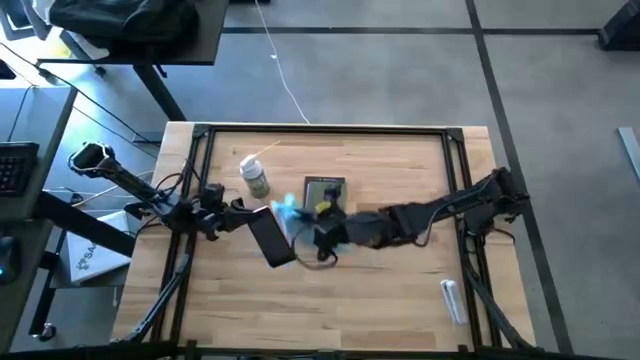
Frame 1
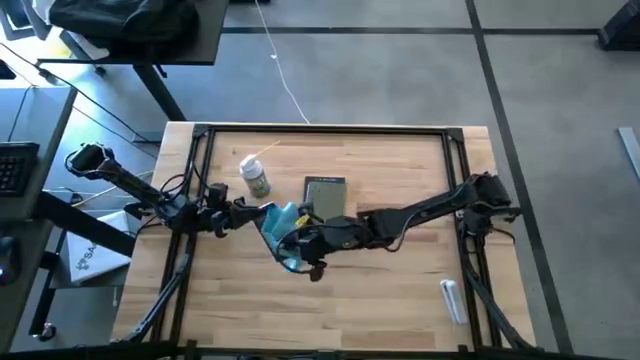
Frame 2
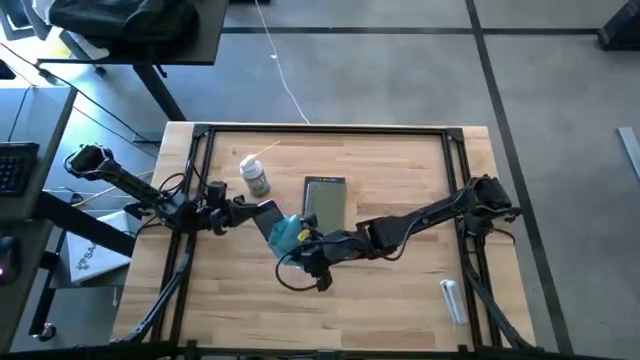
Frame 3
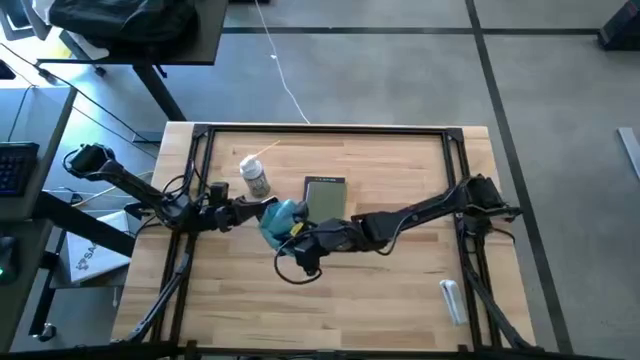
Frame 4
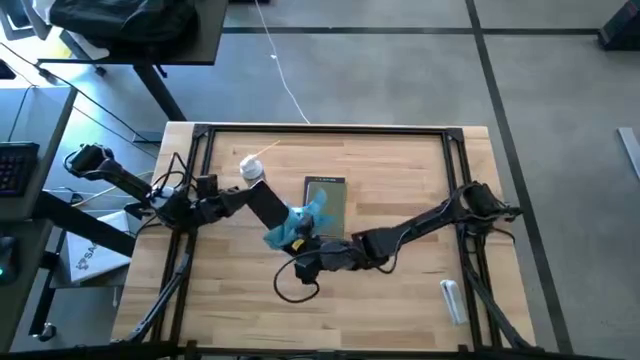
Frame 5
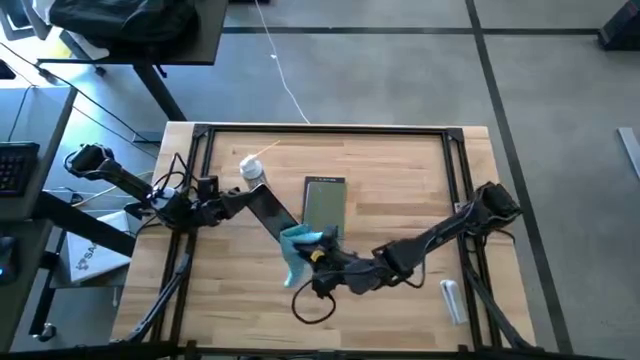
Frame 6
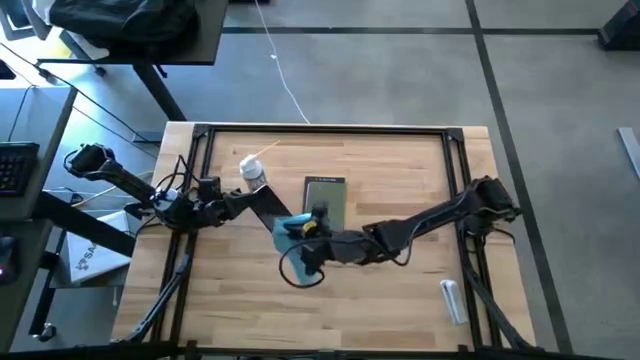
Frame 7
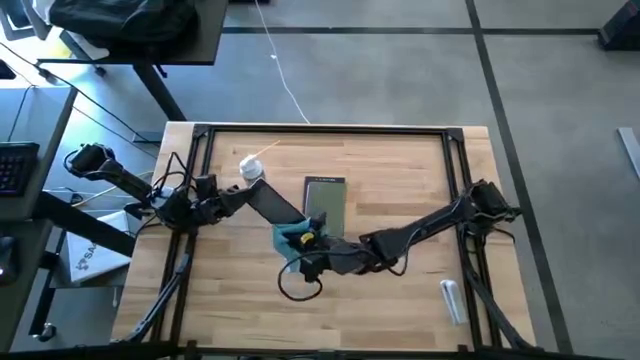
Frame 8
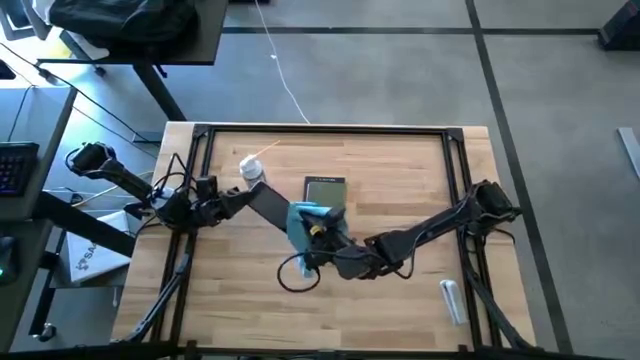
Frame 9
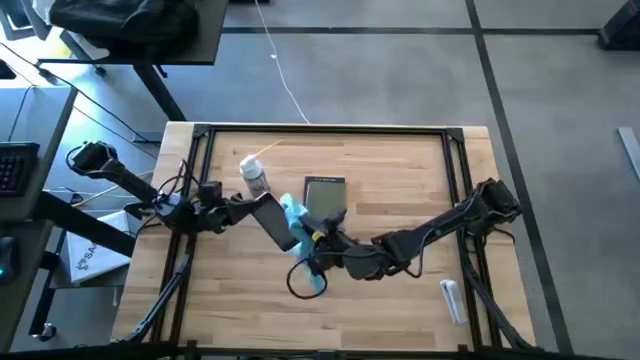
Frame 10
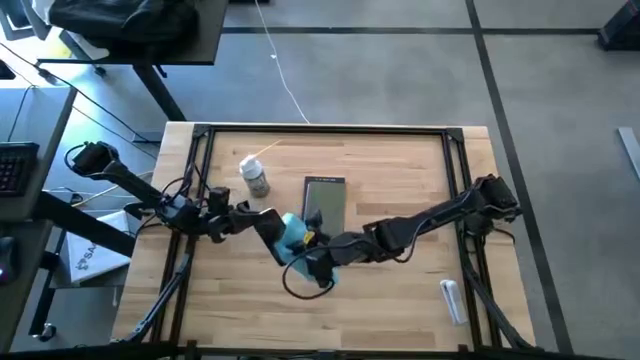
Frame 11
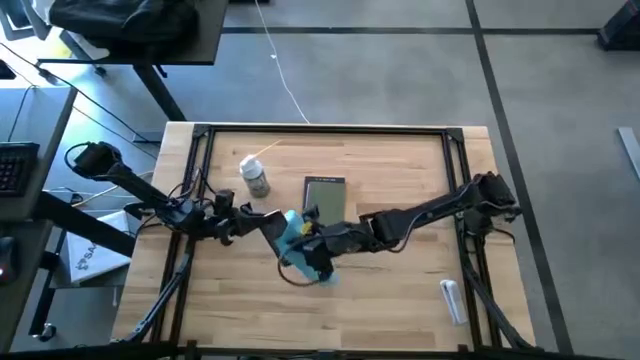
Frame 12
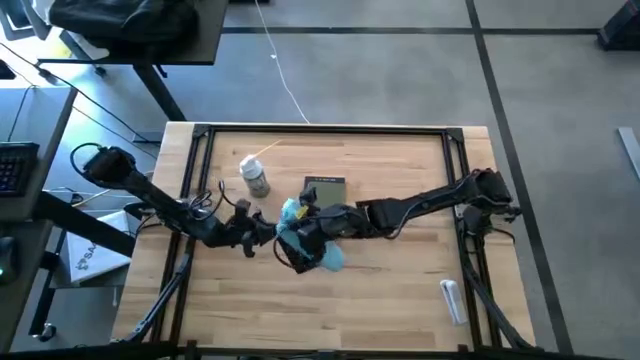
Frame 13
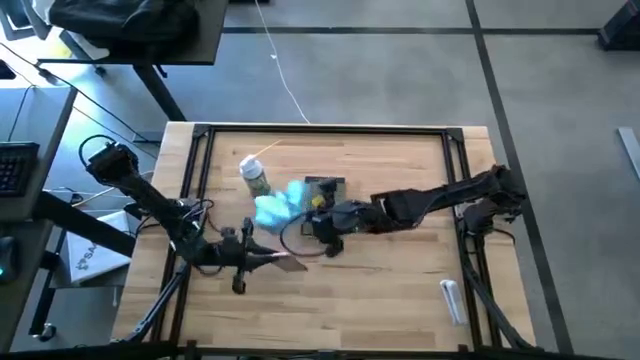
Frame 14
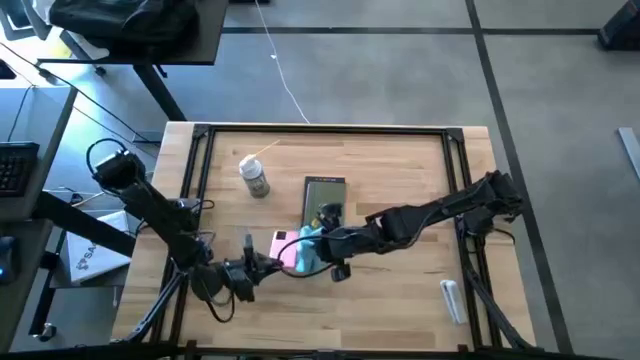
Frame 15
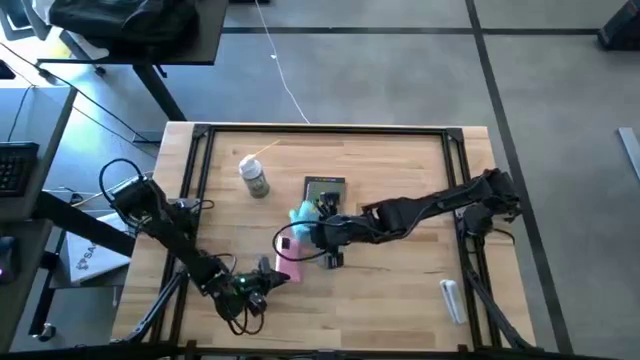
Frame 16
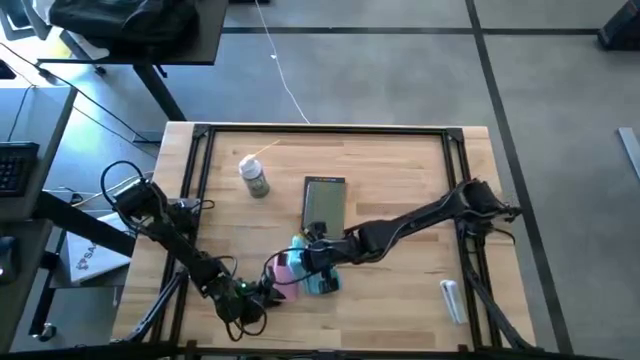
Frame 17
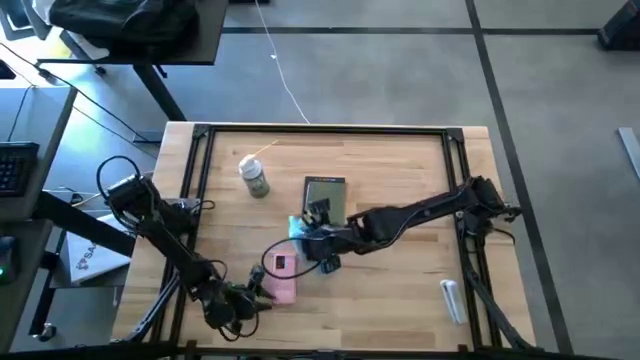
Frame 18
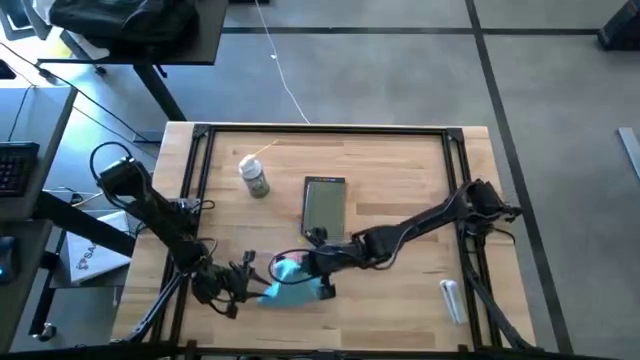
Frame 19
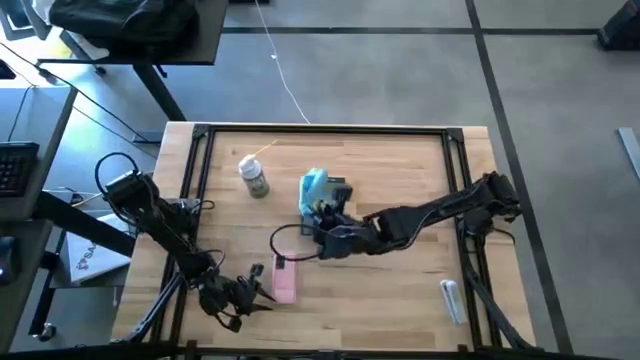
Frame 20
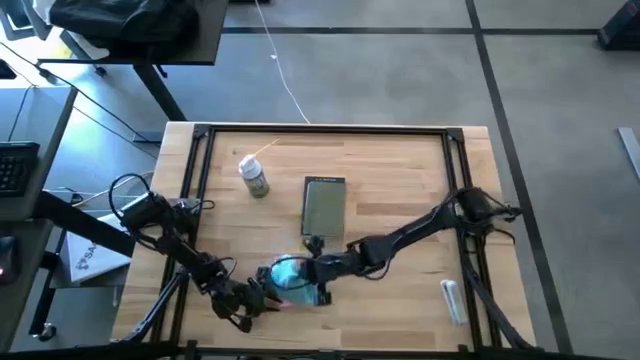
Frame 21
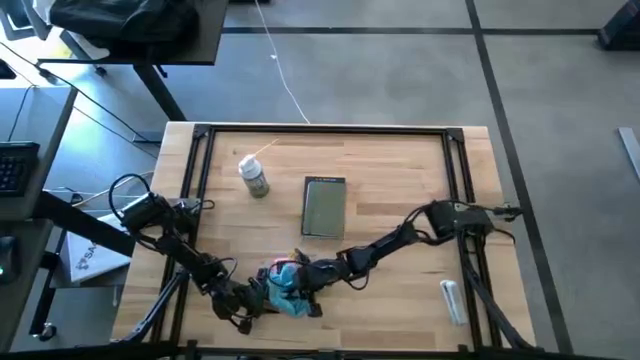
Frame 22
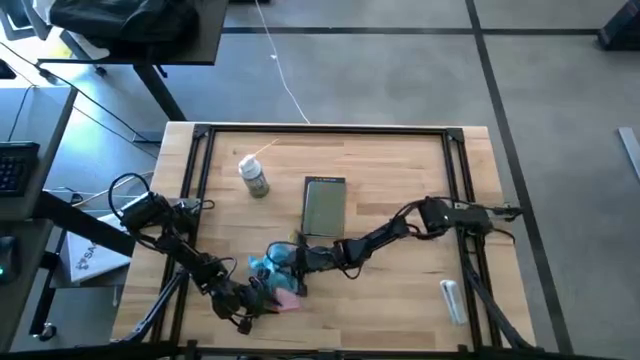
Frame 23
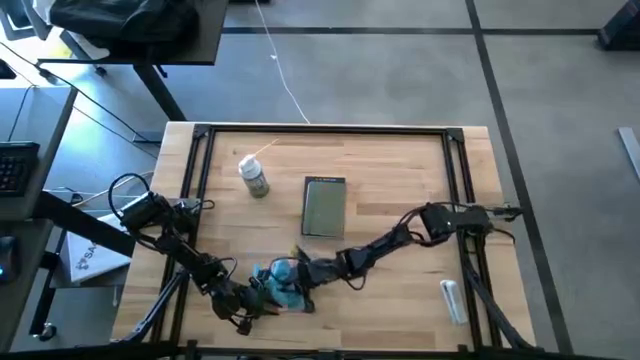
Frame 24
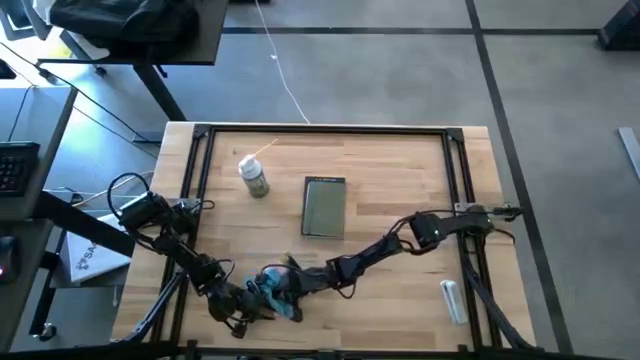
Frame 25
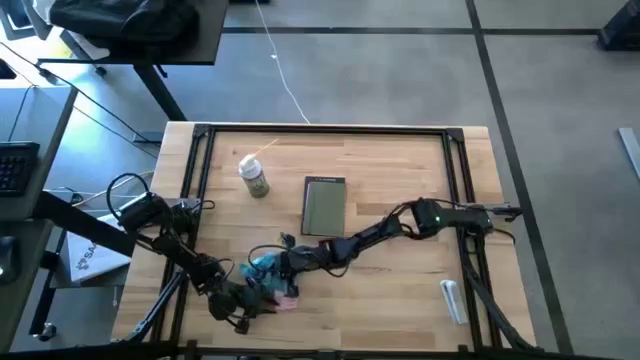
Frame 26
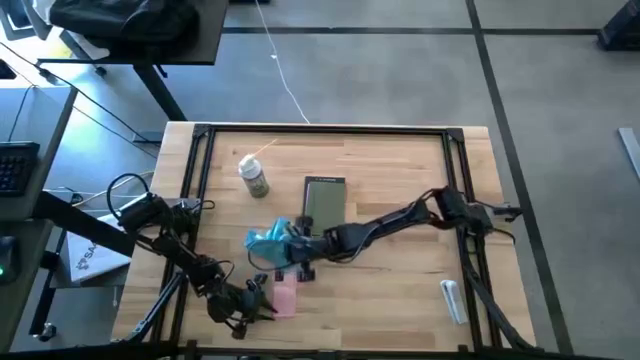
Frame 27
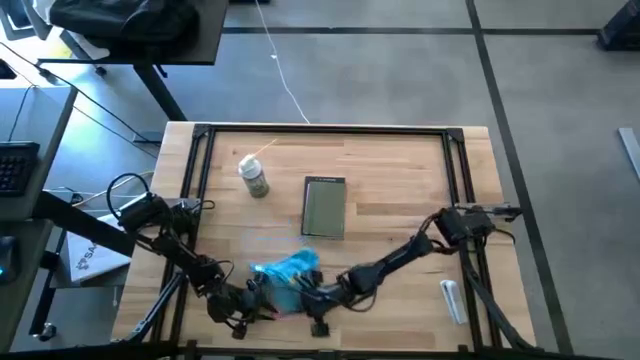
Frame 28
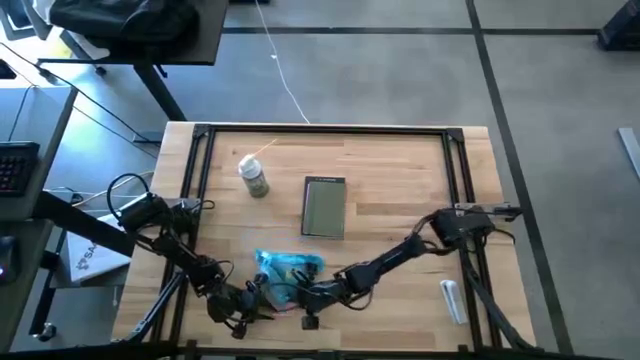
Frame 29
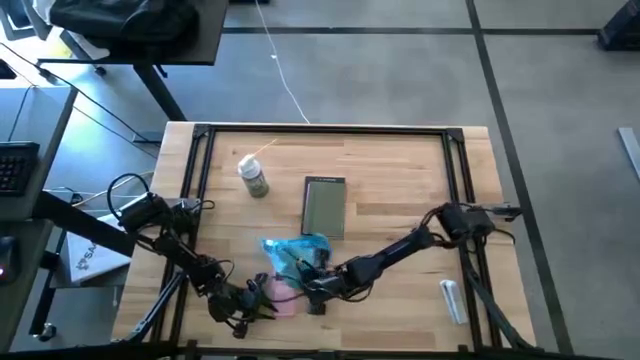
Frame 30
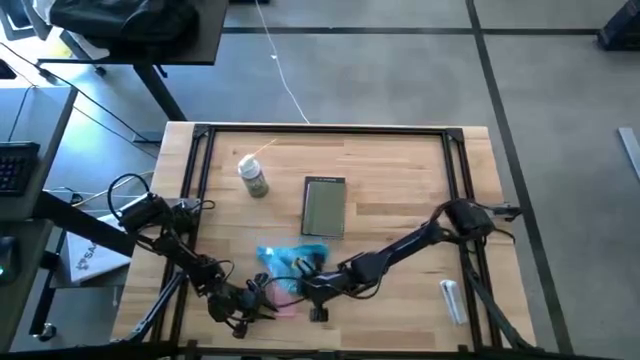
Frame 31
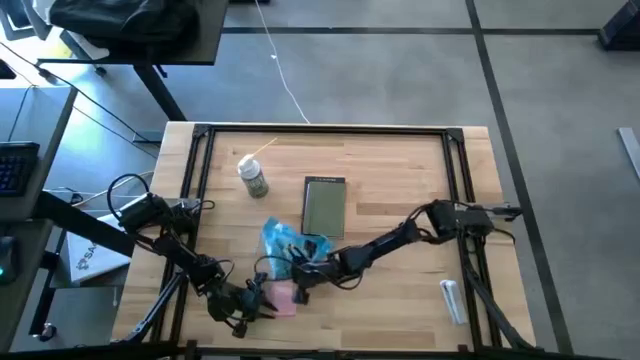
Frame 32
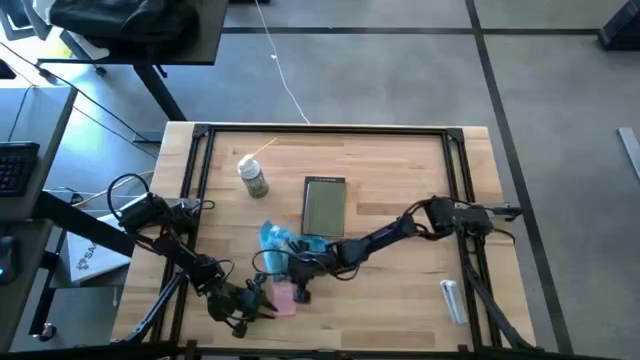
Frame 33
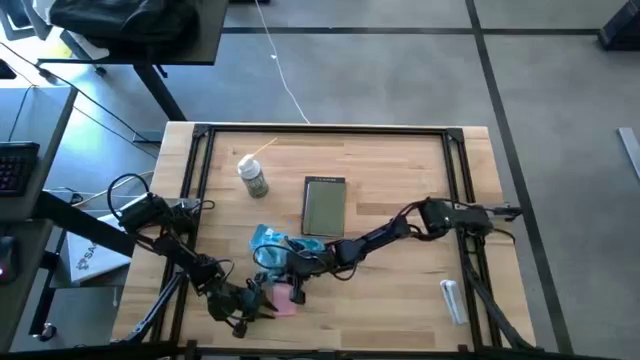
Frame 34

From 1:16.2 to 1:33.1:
Task: Apply microfiber cloth
Wipe the cellphone with a microfiber cloth

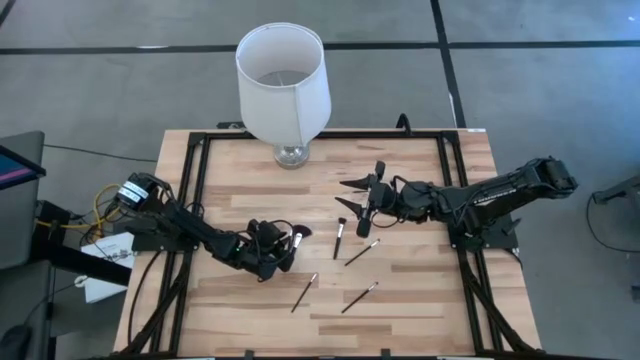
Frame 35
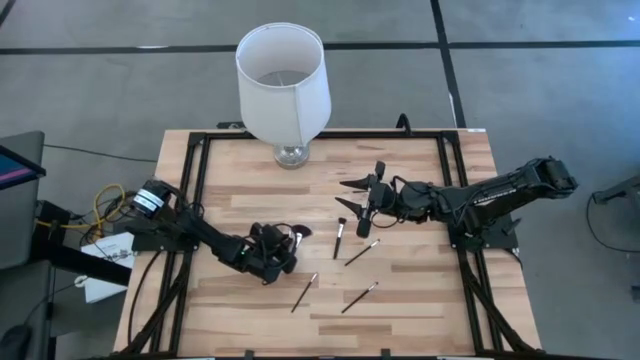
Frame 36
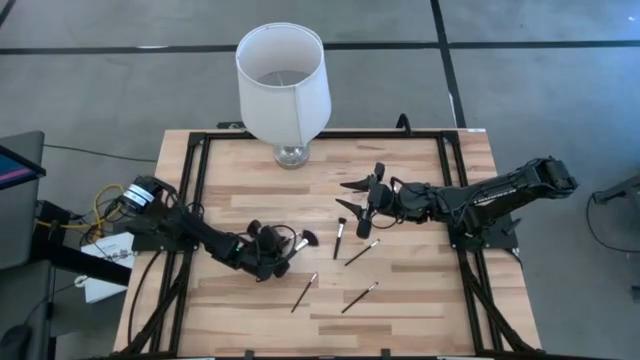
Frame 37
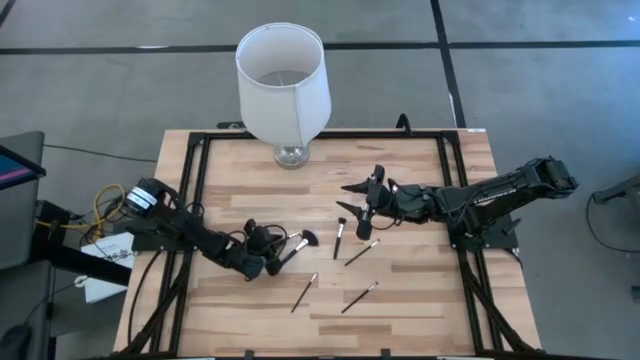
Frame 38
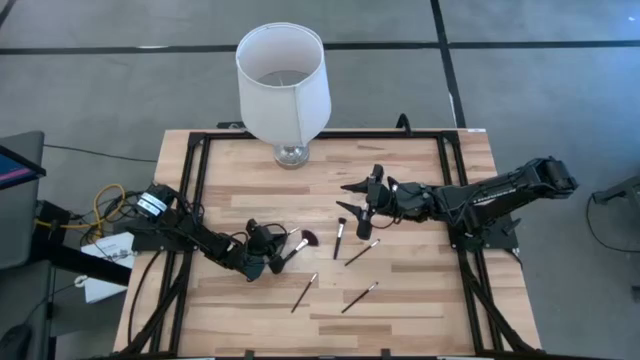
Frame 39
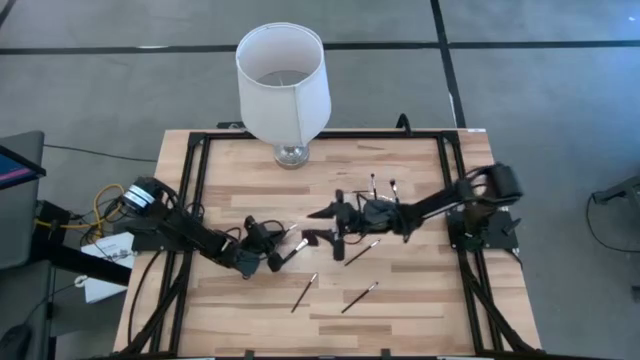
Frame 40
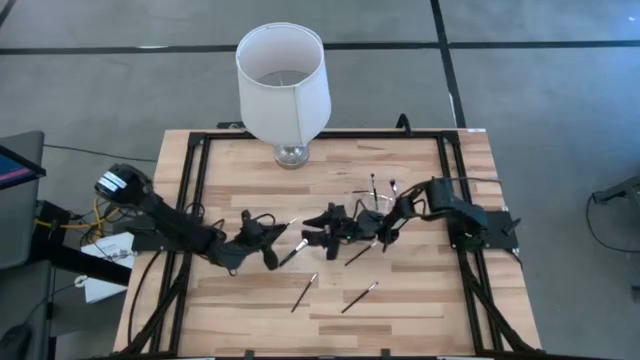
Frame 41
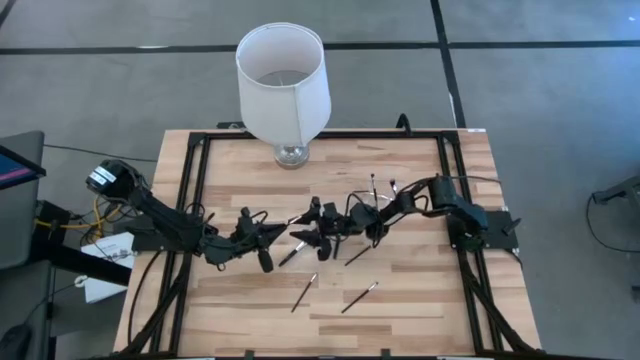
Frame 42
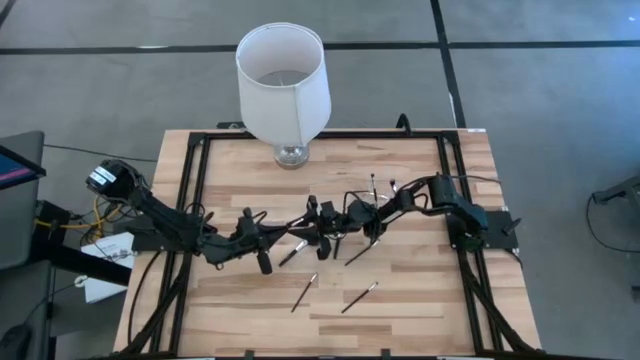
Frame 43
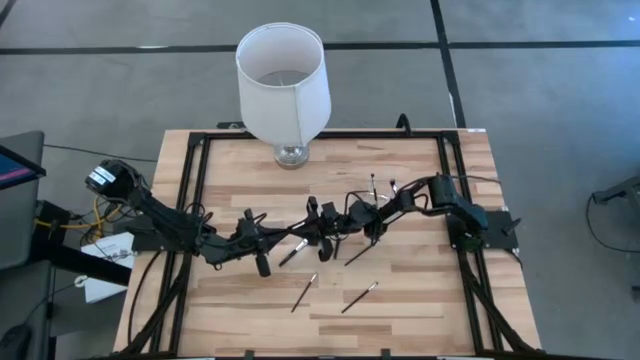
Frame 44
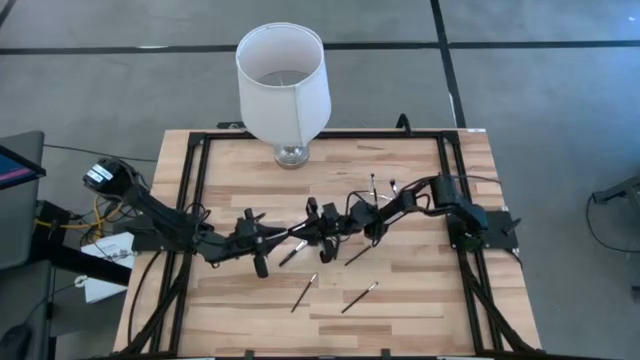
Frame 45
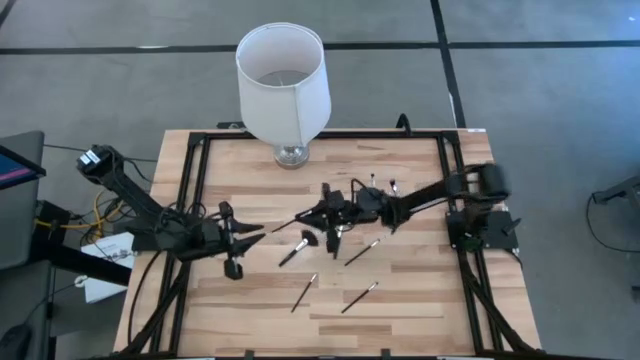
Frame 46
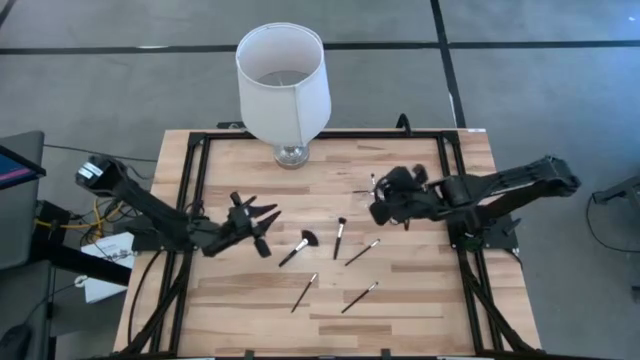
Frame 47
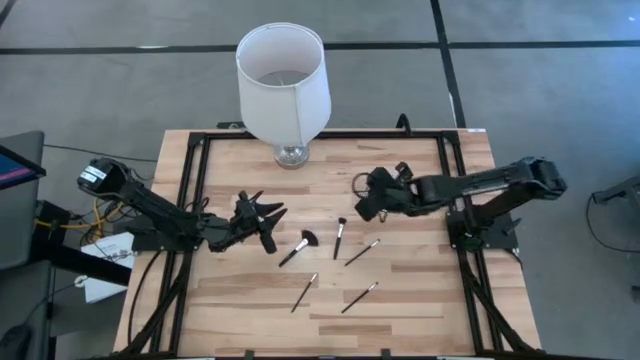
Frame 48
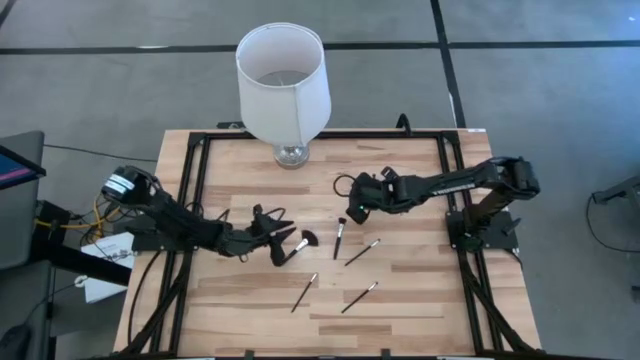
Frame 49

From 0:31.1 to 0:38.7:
Task: Pick & Place Makeup Supplies
Put the black makeup brush into the transparent organizer
